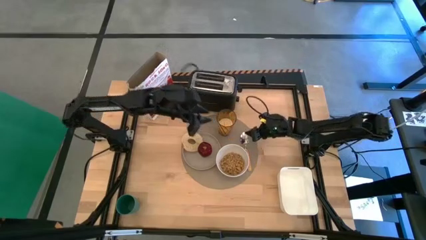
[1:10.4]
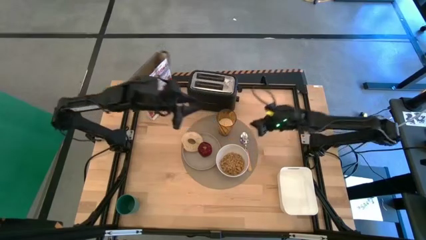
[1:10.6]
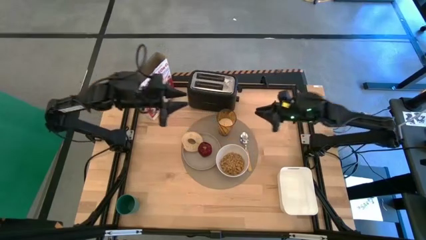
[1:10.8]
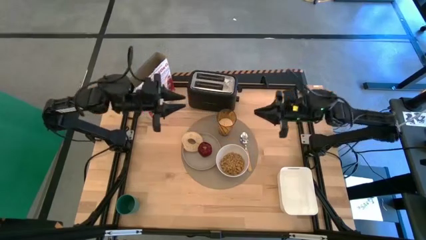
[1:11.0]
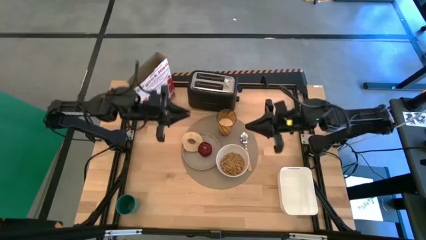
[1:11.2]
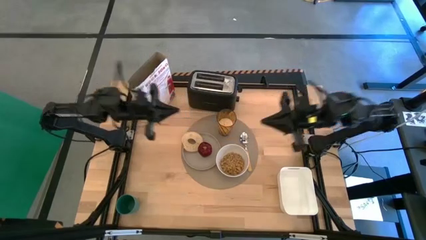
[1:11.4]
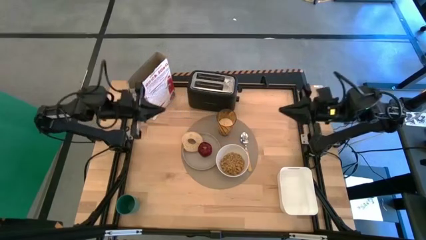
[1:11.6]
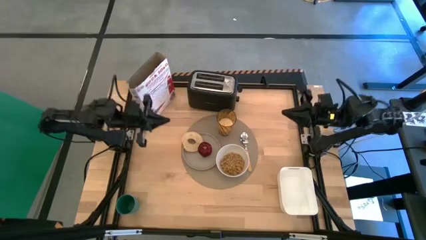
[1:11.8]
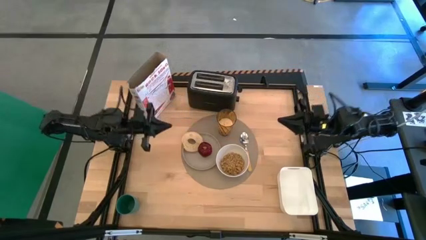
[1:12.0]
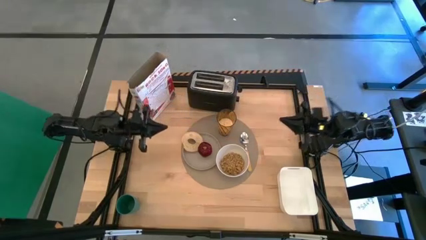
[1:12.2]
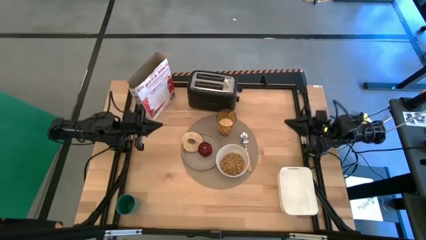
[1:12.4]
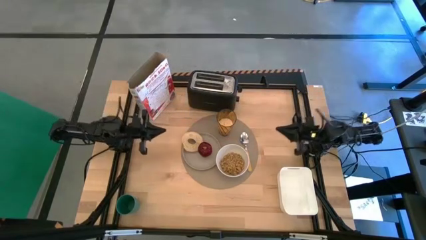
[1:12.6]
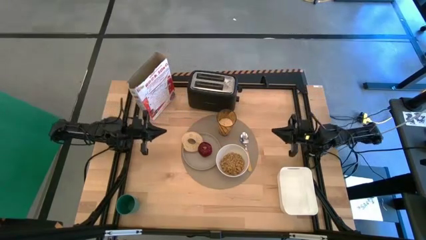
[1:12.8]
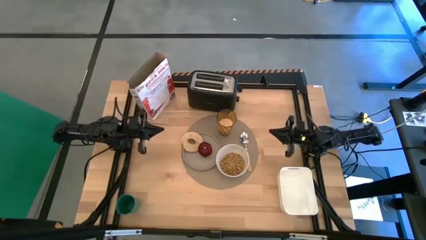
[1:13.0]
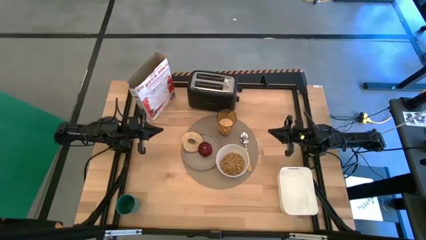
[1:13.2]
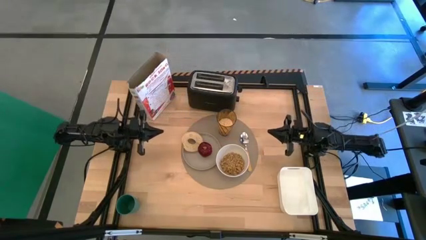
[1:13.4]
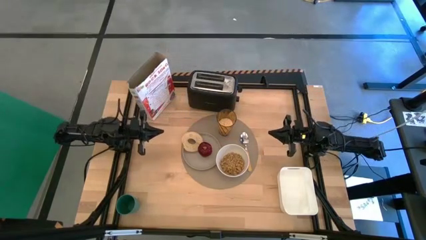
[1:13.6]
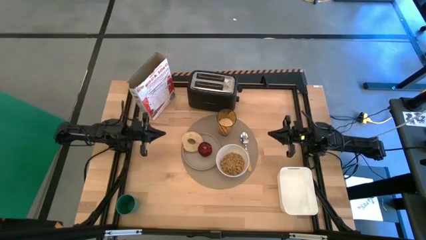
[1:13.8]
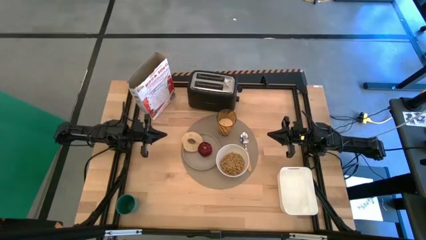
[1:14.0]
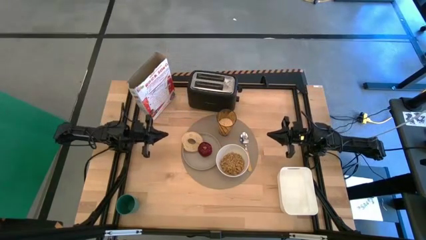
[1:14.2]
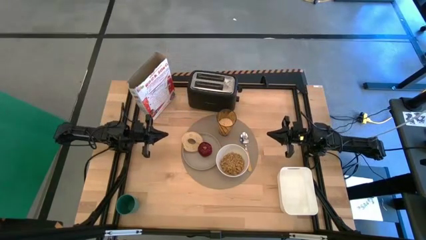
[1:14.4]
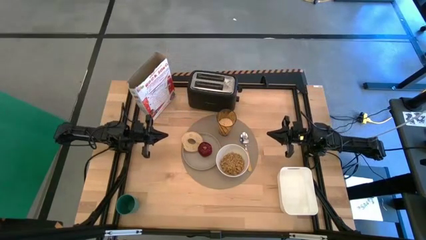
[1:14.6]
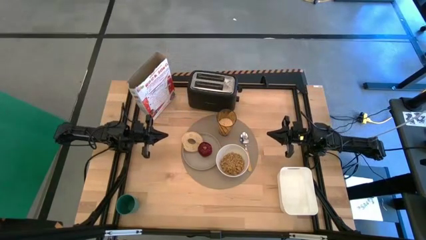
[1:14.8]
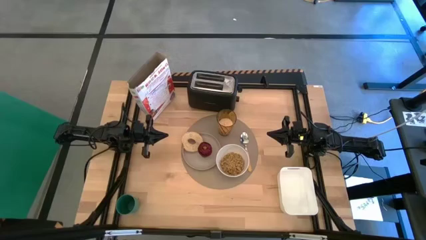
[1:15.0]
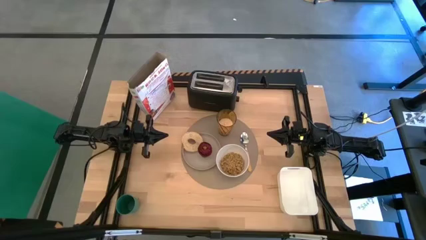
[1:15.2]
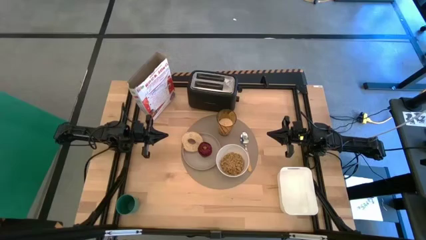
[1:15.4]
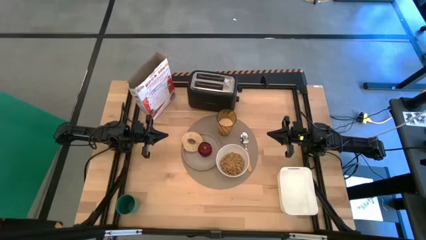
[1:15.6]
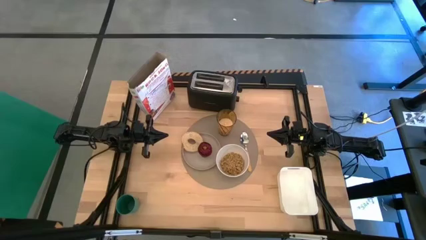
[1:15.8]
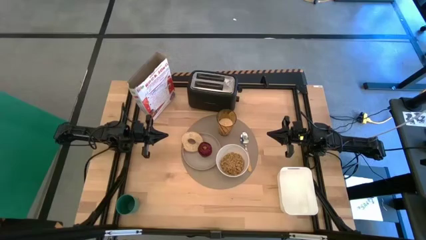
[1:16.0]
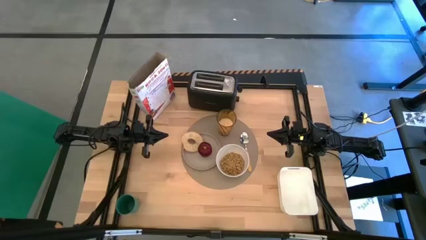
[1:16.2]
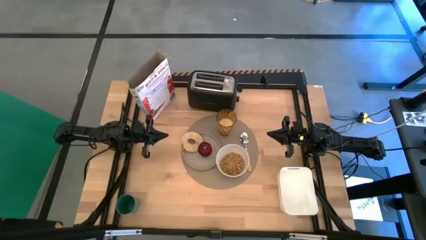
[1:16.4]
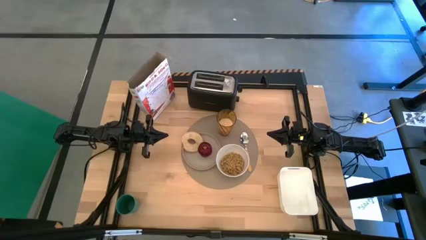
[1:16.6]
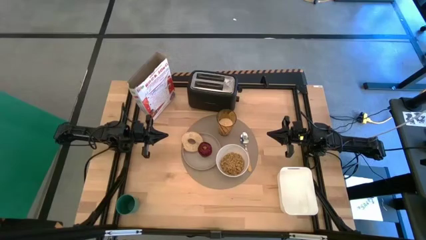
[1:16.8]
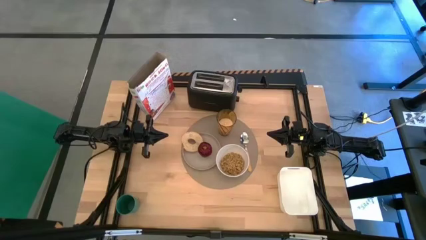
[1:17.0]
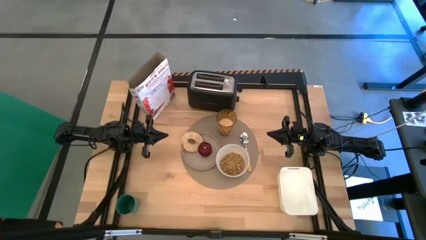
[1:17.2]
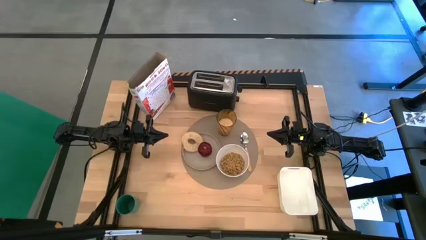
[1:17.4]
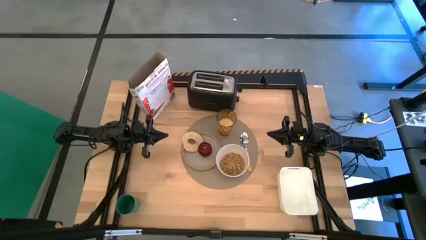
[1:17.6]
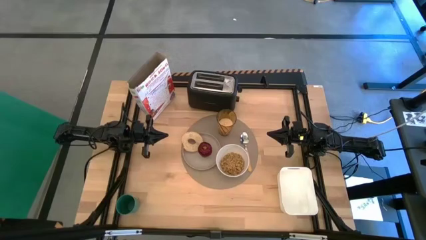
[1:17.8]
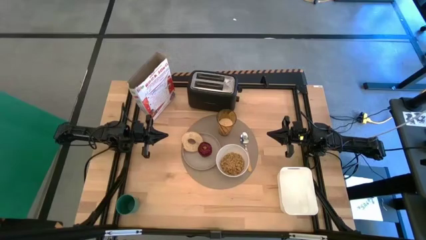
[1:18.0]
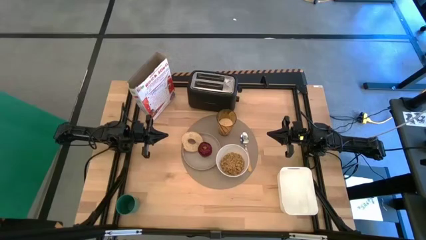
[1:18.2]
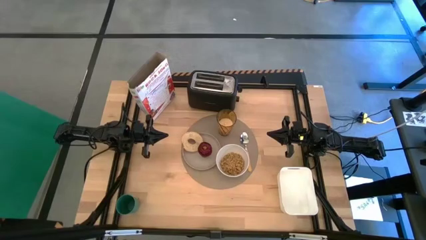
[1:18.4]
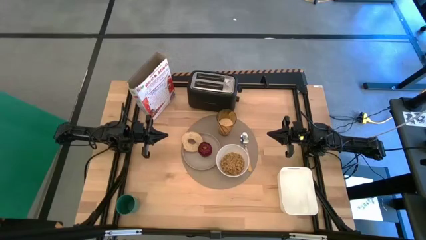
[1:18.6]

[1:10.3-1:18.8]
Task: Arrange a breakfast setting
Return to Home Position

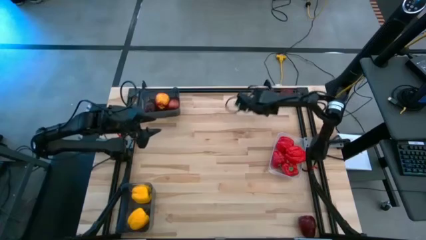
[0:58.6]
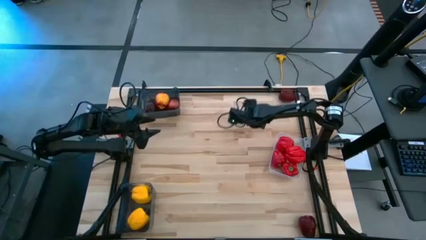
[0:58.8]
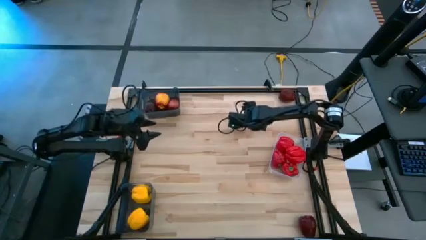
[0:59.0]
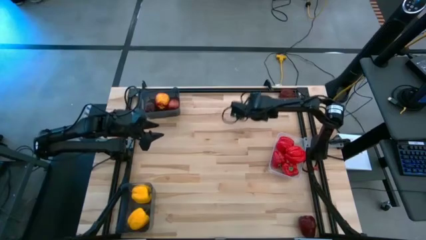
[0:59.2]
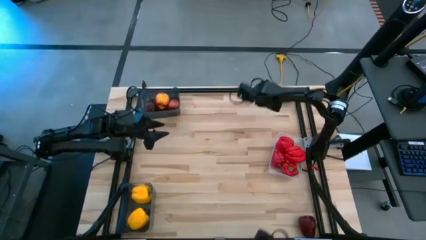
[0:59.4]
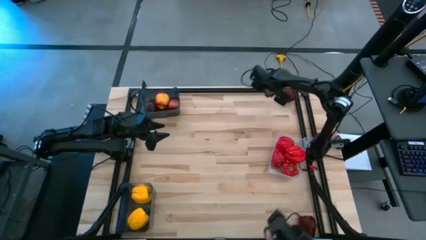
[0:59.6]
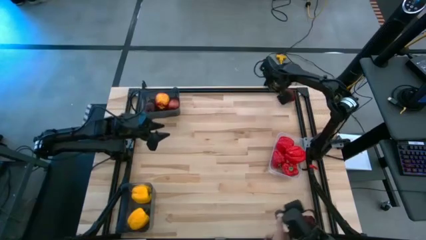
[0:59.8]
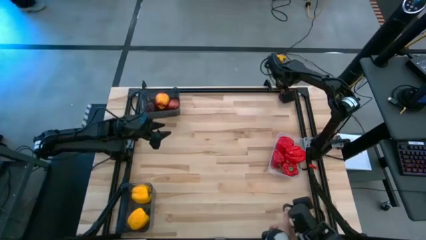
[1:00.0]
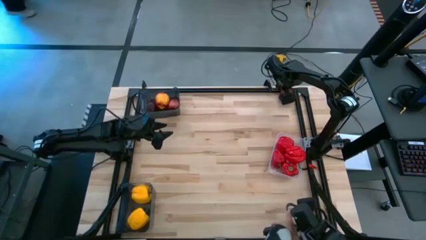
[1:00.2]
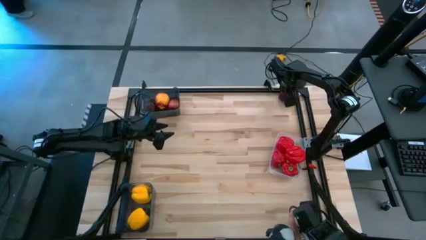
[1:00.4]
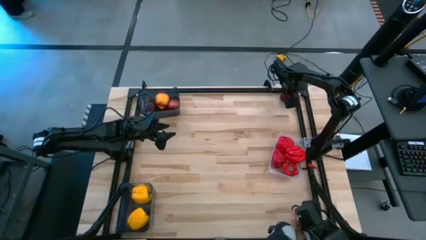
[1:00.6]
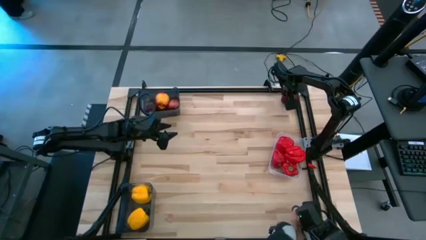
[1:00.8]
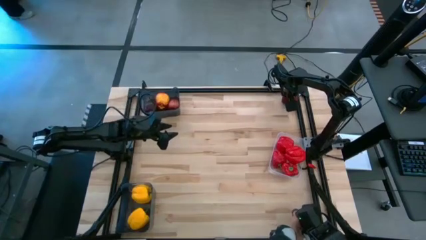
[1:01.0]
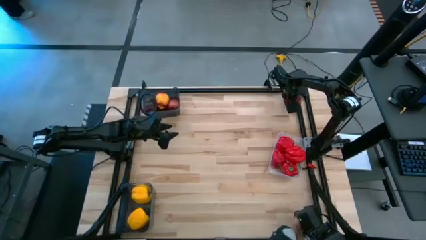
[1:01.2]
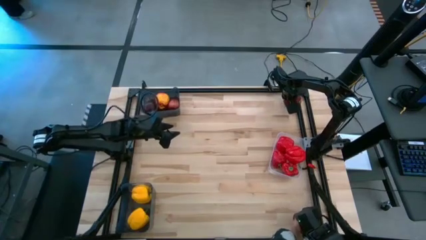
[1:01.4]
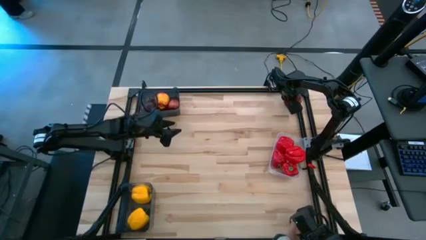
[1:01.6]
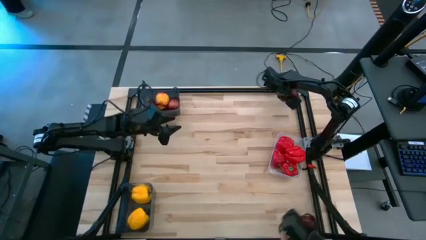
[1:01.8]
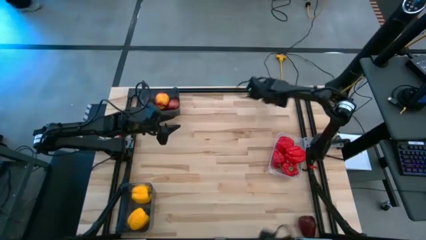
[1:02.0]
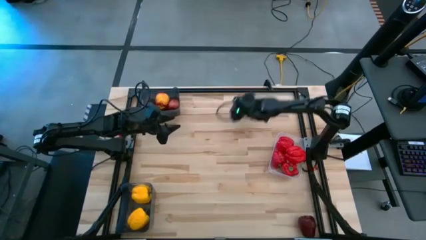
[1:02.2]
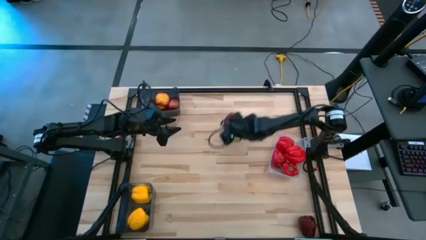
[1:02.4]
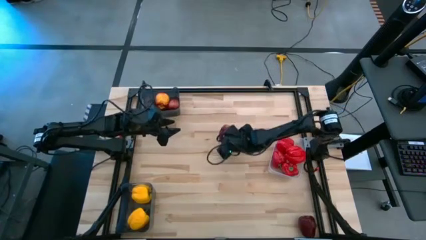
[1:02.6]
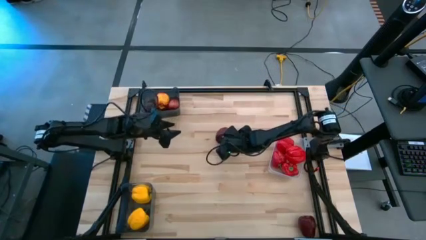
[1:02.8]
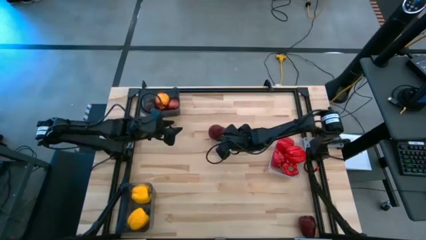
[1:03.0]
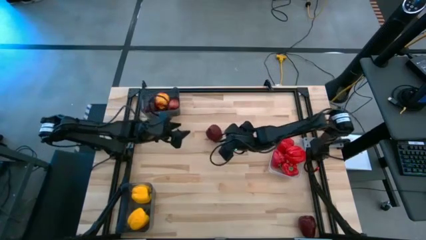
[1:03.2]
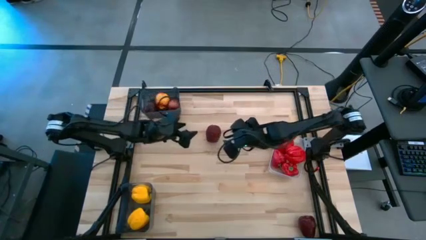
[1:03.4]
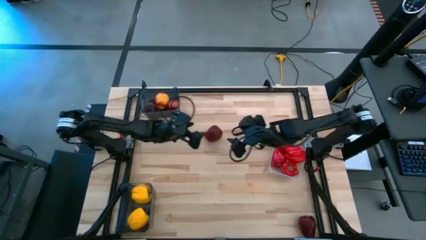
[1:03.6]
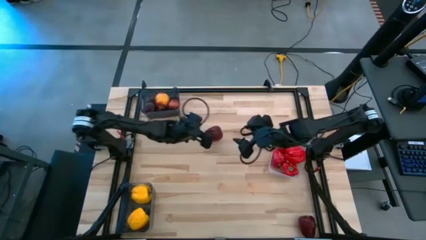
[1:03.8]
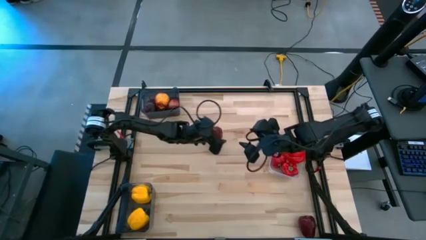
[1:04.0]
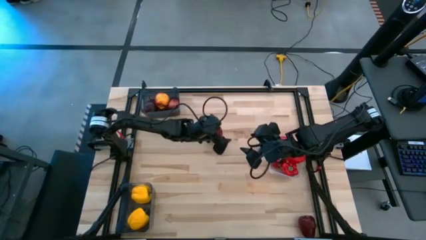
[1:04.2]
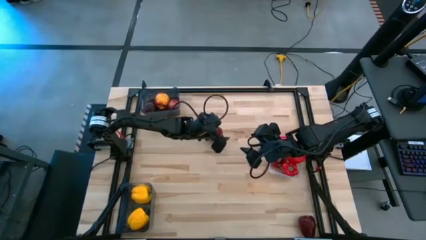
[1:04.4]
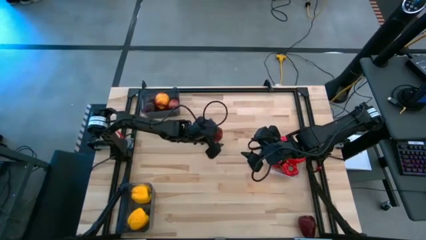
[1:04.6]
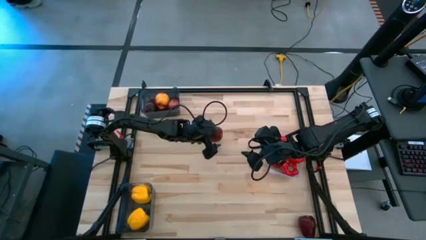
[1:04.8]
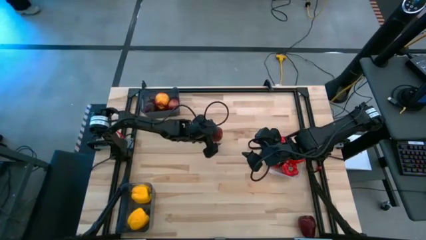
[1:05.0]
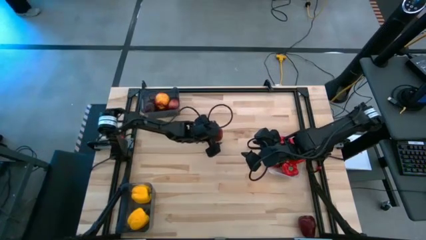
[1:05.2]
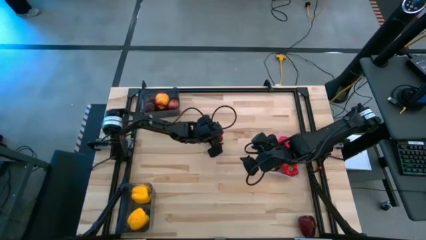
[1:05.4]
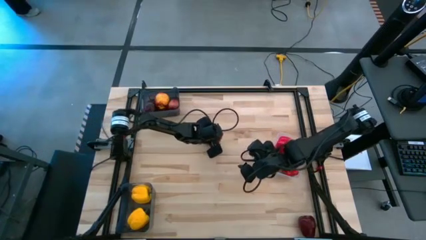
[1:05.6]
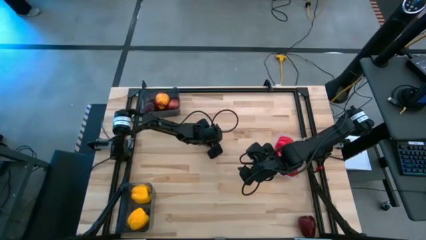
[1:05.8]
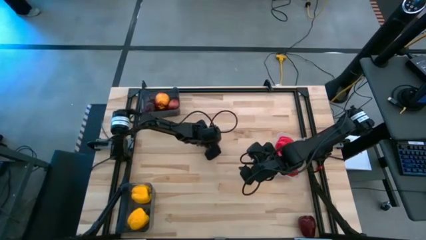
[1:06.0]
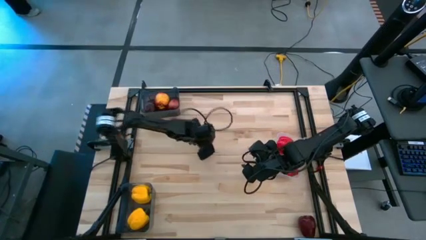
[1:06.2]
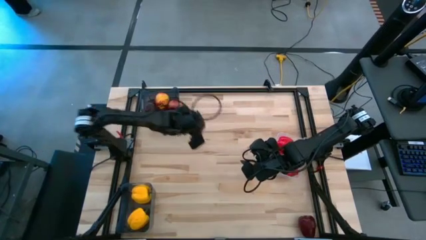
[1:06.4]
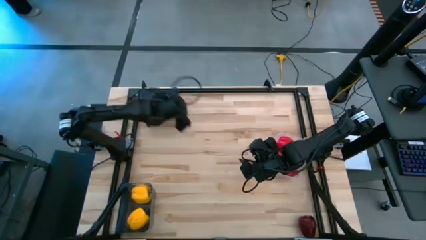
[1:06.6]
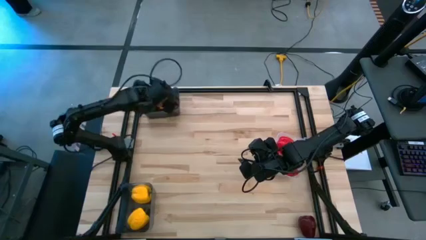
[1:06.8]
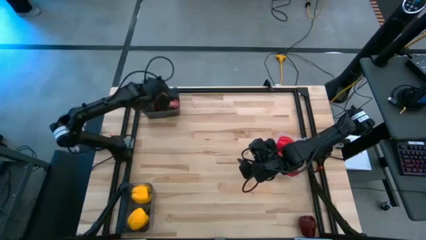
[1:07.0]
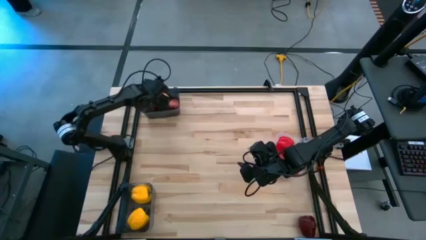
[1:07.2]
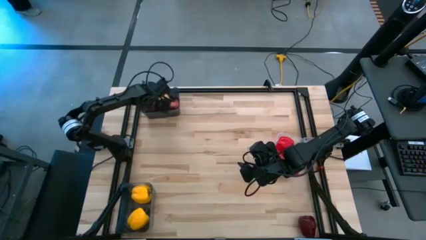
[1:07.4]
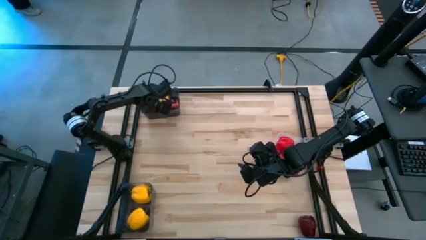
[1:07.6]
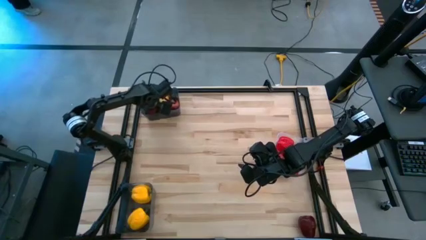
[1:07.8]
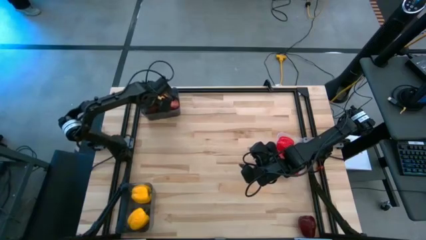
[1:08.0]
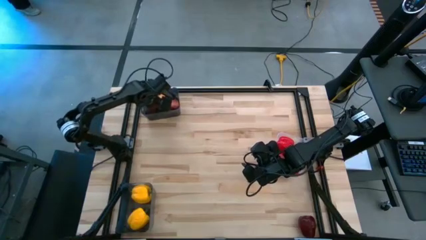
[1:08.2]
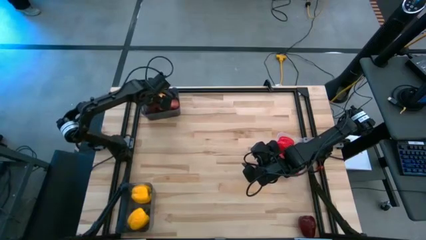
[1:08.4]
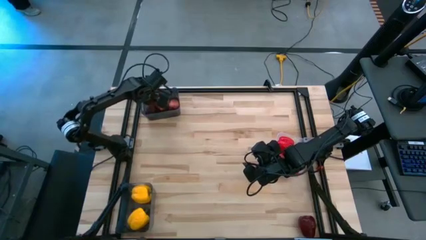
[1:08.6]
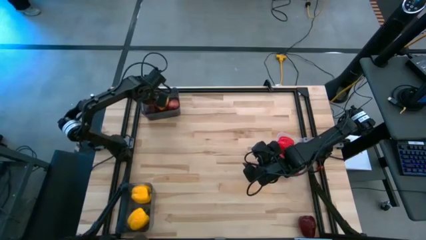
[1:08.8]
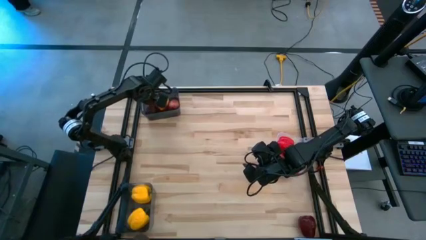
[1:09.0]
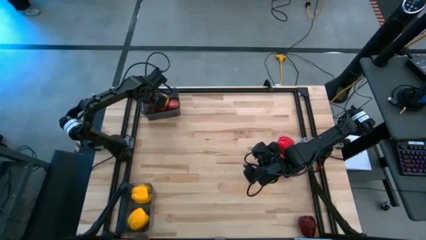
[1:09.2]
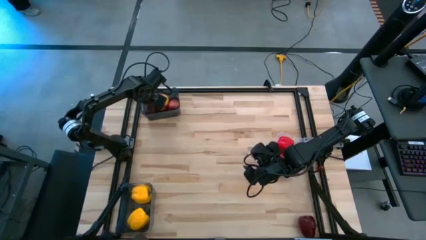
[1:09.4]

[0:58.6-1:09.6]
Task: Sort produce into baskets
Put the apple into the top black bin
